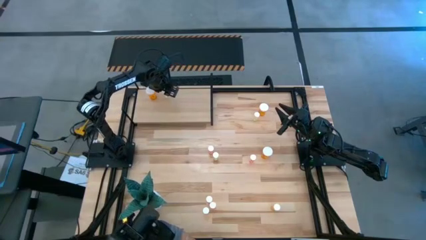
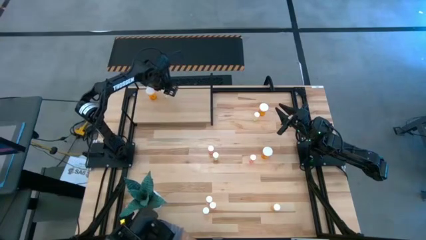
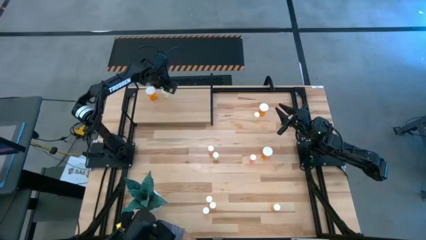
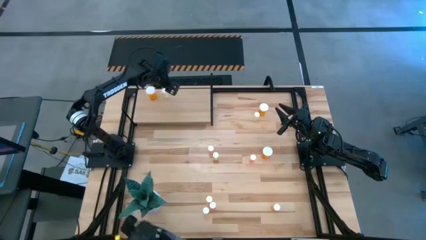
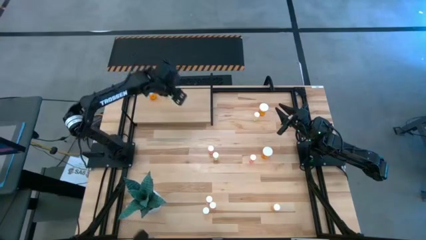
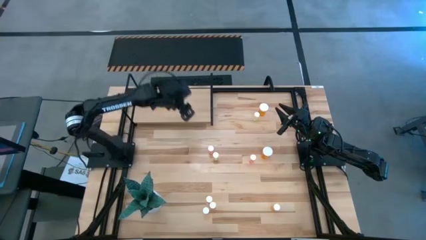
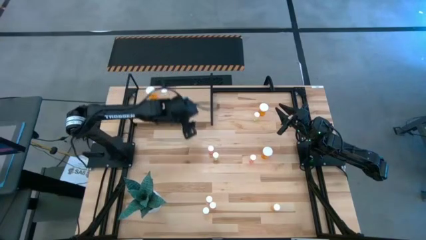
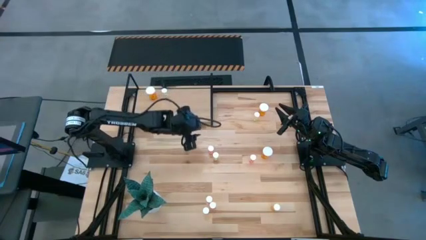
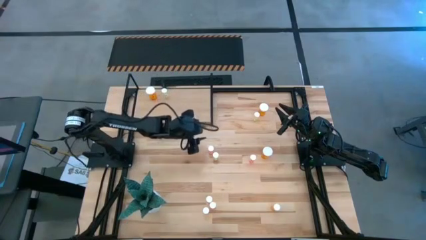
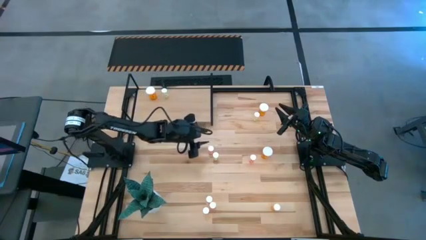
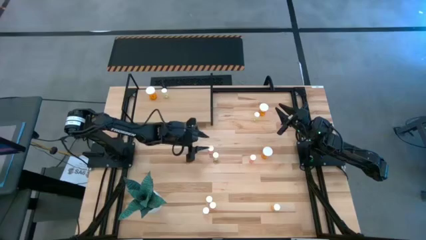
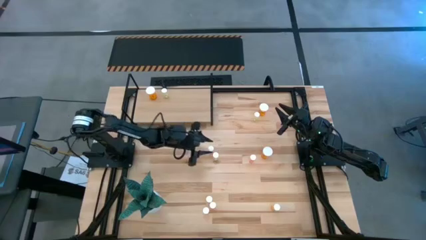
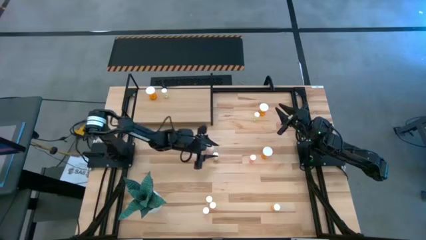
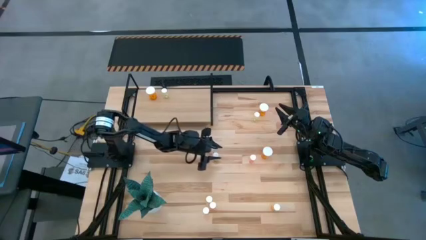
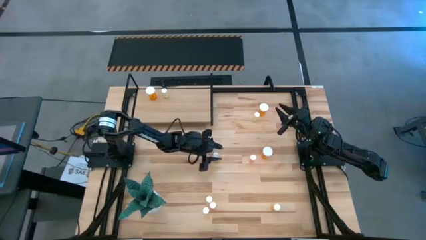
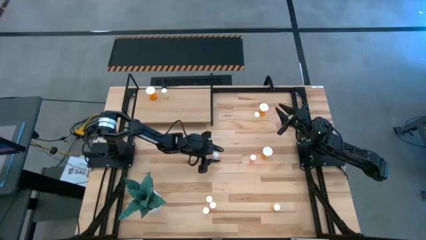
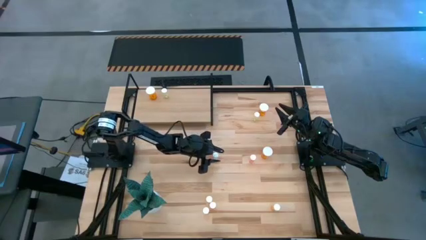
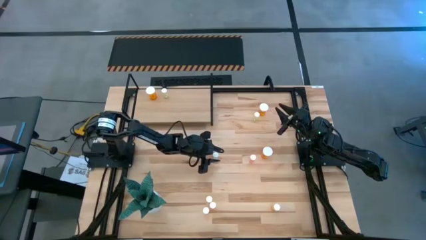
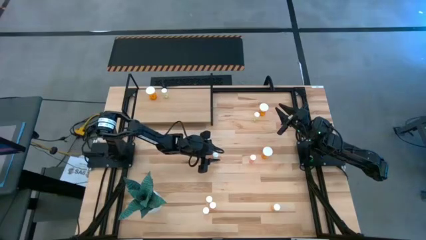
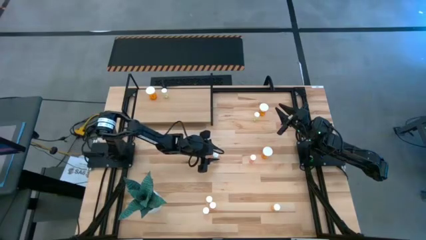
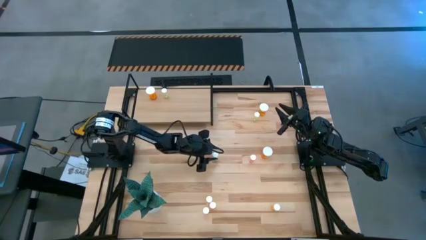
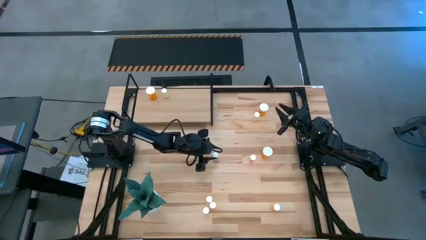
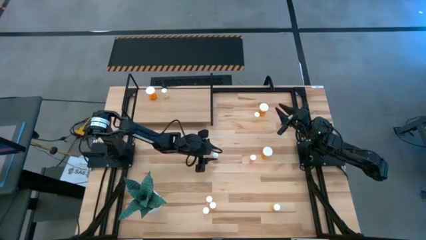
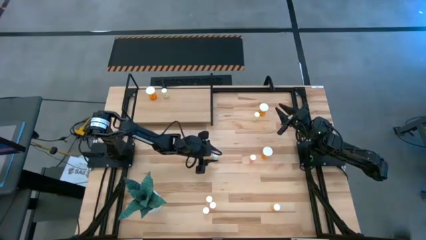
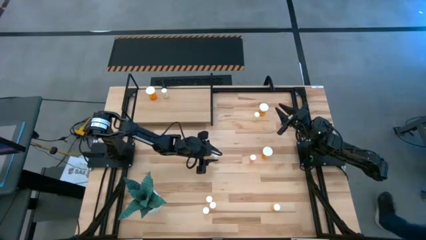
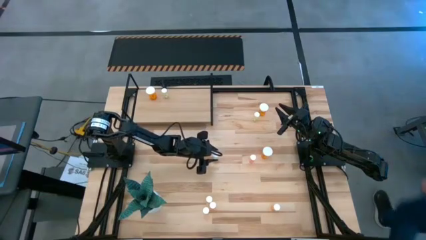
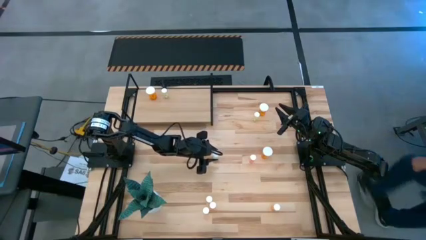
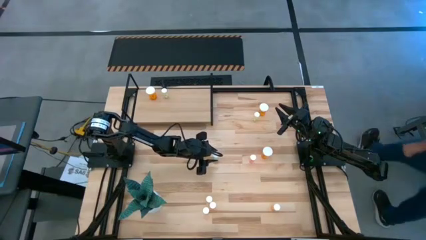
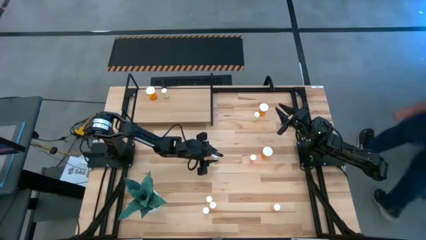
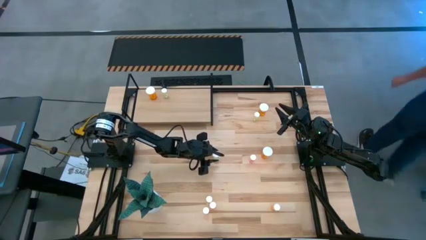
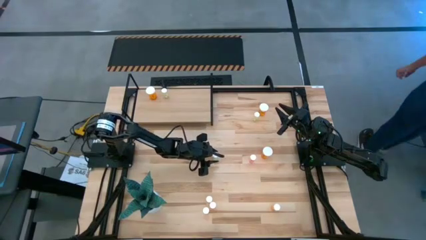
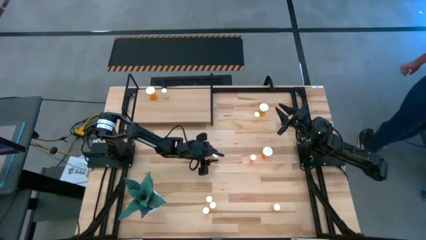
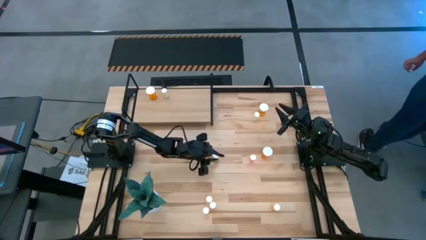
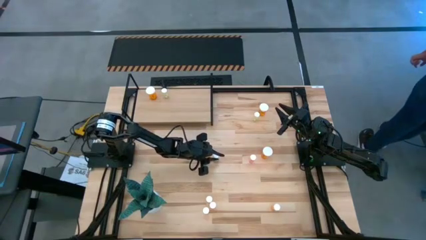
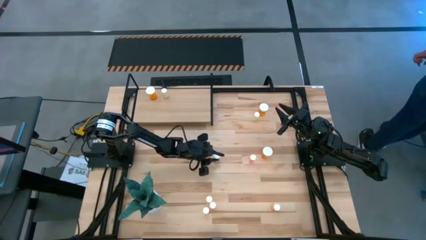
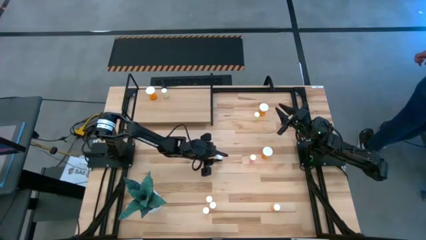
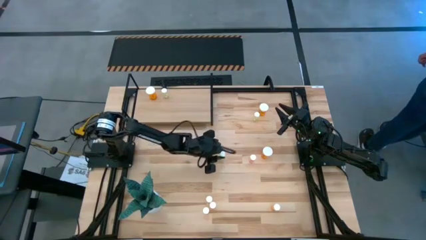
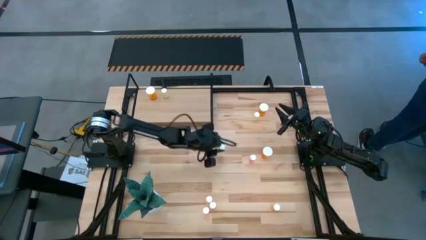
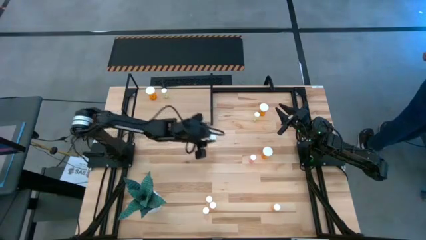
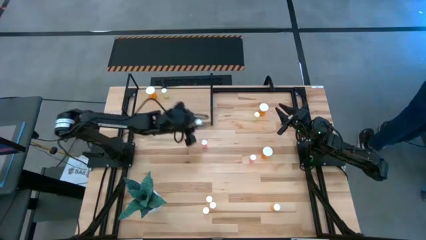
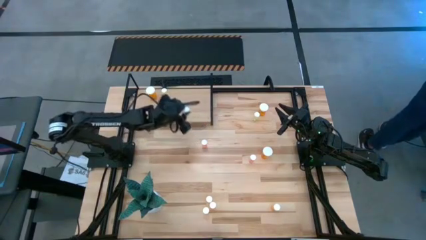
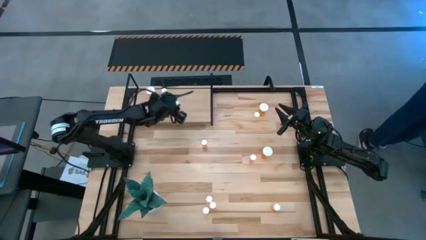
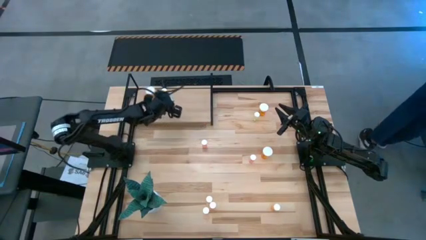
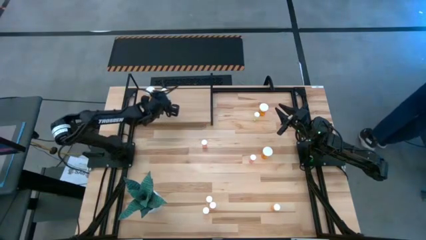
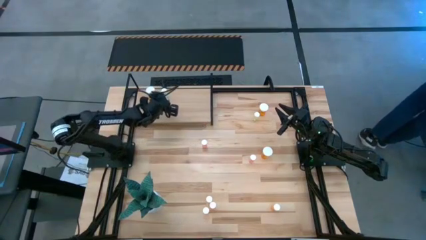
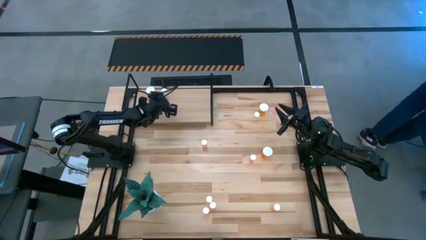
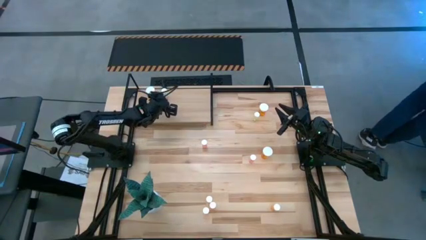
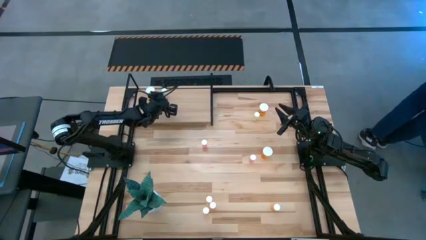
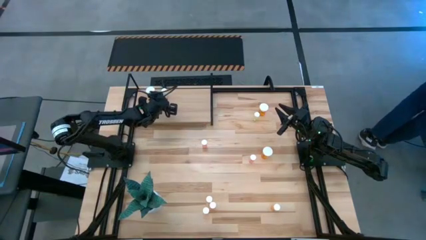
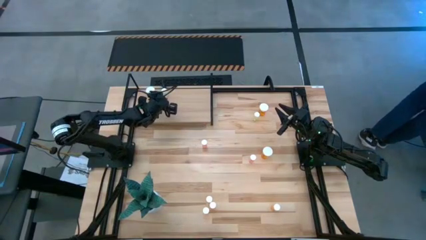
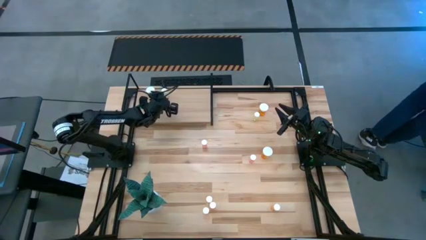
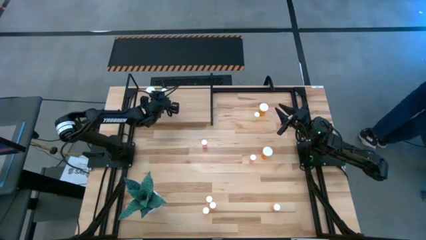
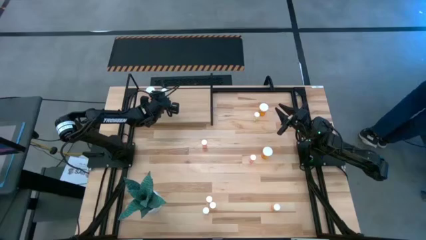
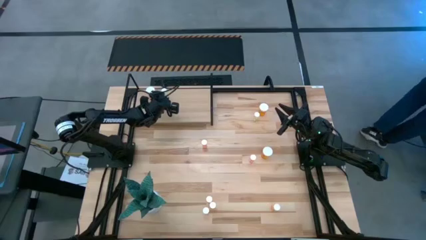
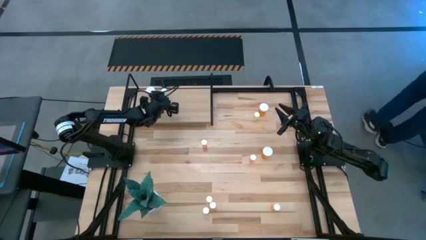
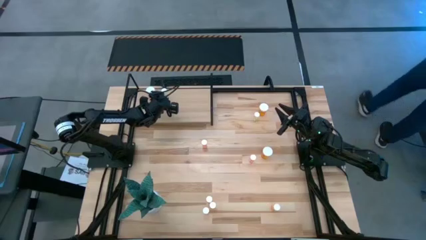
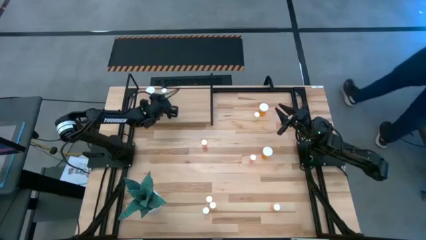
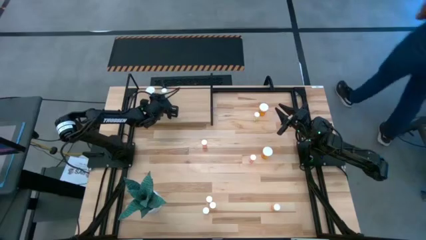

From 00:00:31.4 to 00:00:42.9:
Task: Pick and place medicine bottles onto shelf by color
Put the bottom yellow pill bottle aligned with the other yellow pill bottle on the shelf
